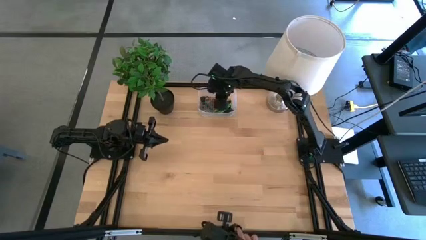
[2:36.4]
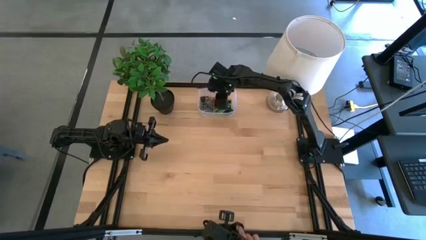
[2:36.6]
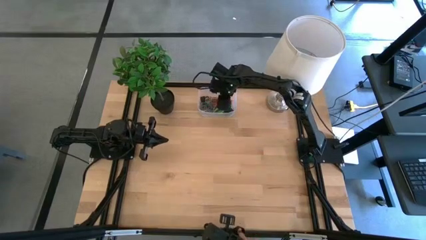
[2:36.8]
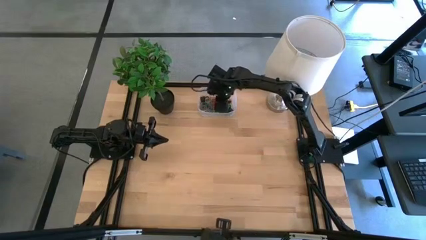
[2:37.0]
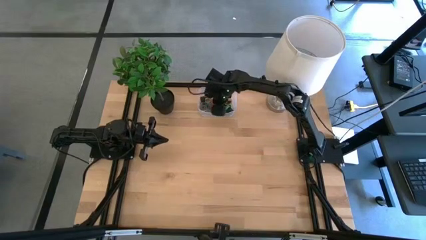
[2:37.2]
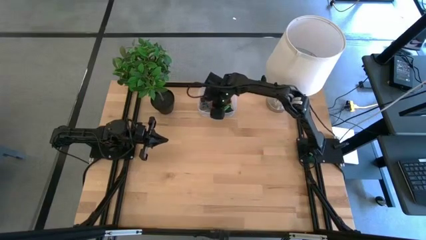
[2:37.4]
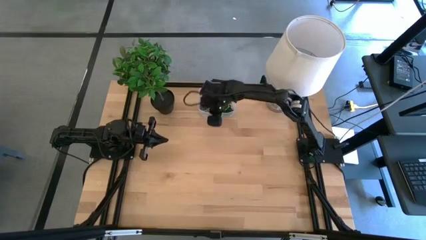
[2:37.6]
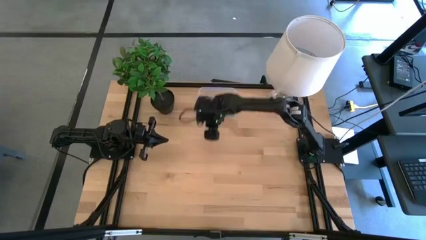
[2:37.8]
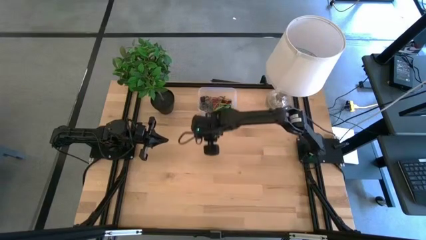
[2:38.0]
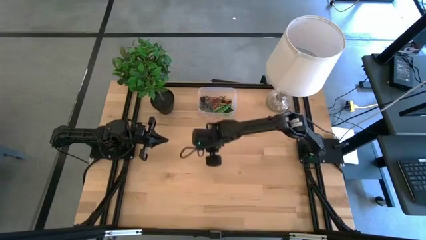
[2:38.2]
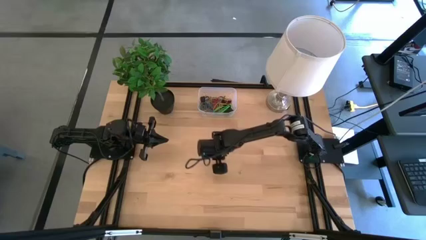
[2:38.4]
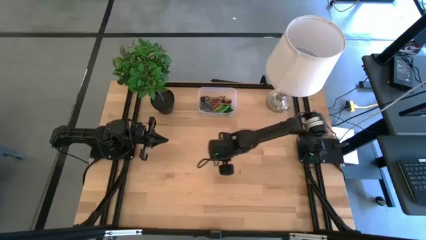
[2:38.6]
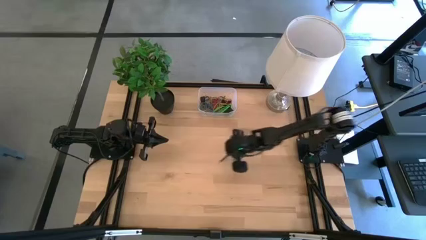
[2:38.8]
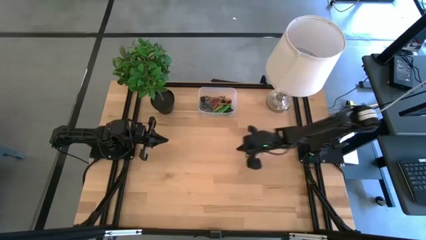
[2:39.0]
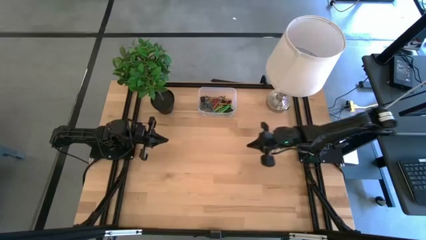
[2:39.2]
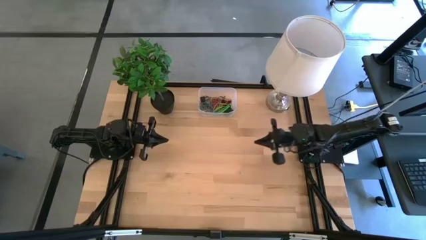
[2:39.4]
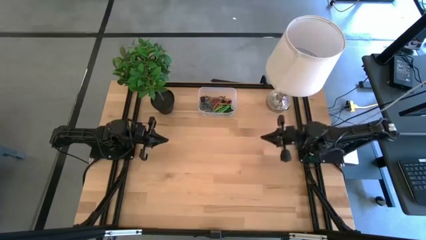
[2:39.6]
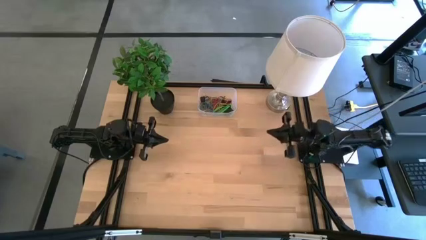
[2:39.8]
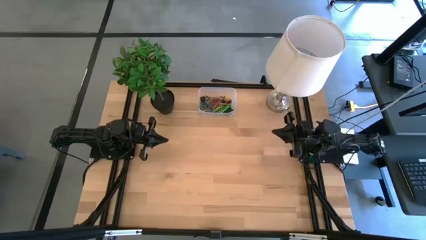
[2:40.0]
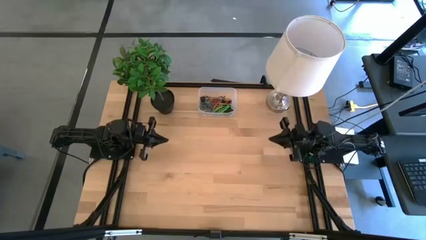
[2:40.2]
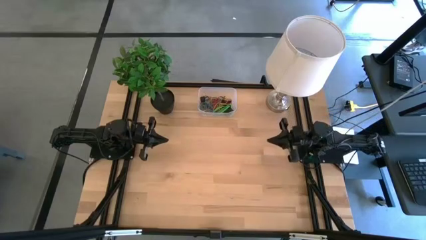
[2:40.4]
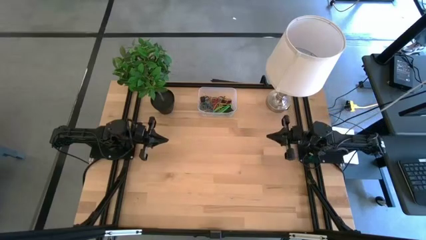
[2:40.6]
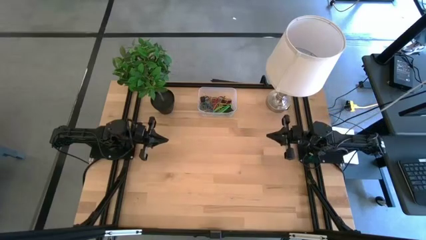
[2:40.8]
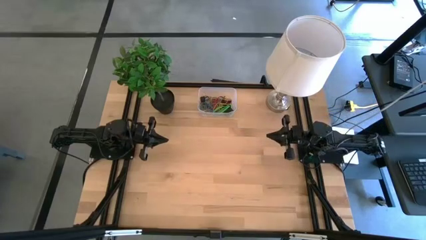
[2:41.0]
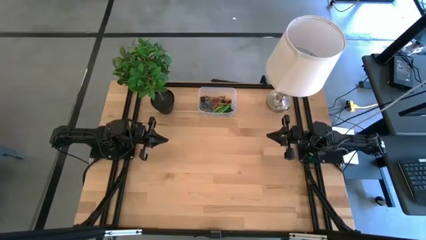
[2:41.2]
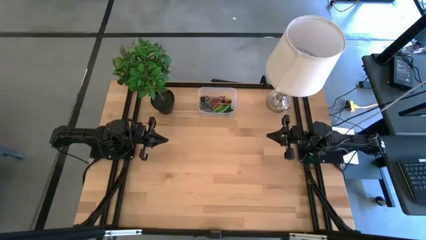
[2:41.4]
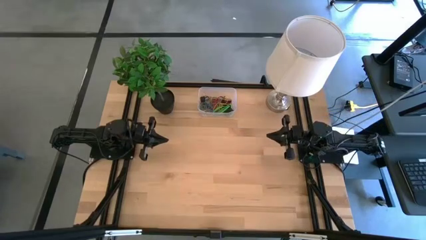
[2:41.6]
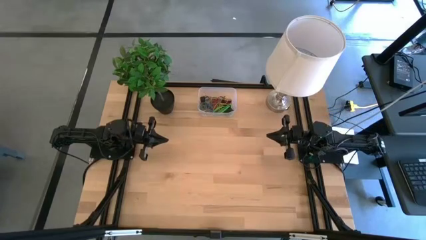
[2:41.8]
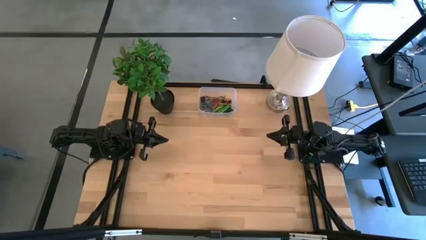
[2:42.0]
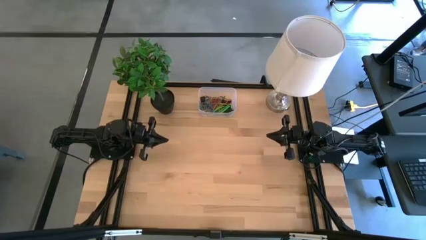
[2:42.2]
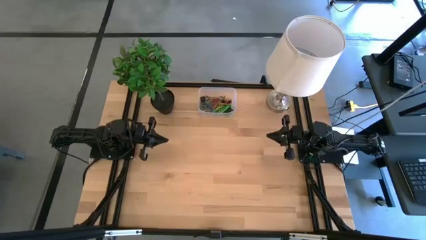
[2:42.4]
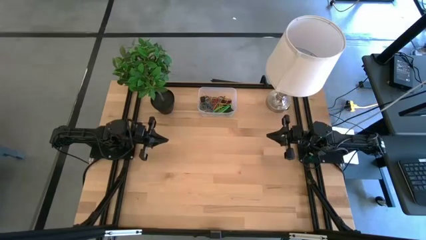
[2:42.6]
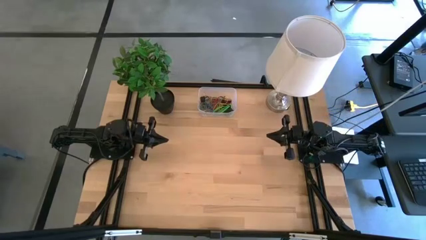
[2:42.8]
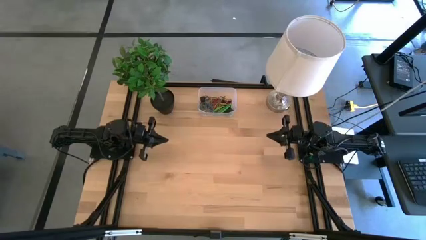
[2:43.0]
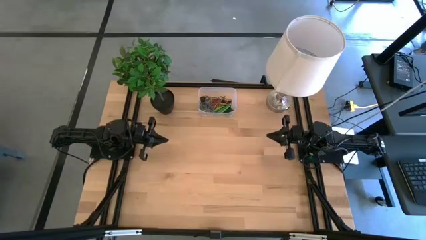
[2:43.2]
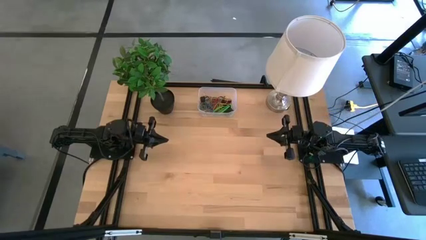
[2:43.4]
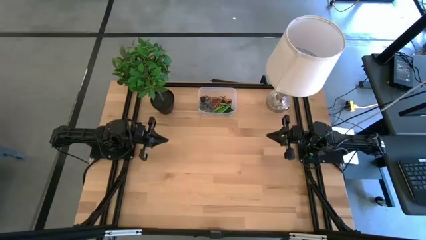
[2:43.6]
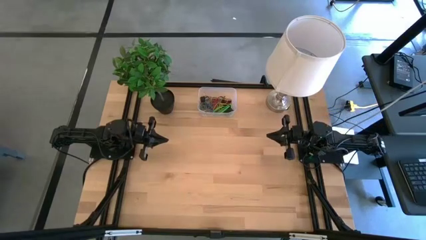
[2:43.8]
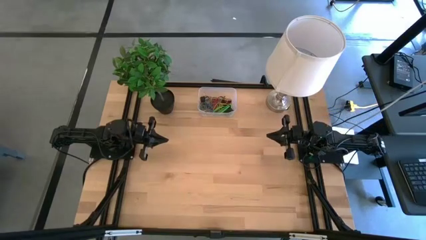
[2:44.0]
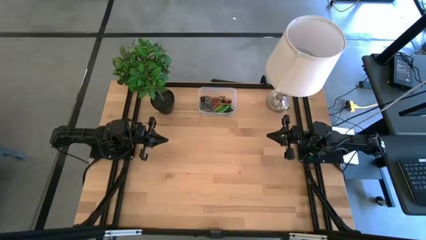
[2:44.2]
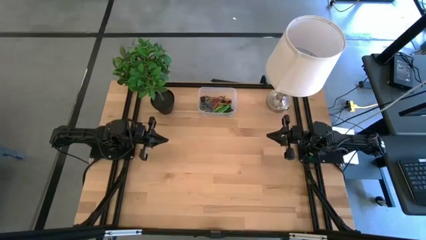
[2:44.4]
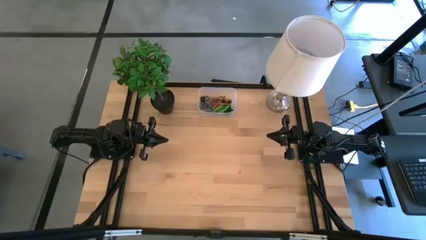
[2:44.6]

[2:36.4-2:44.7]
Task: Pick and place rubber bands into bin
Return to Home Position

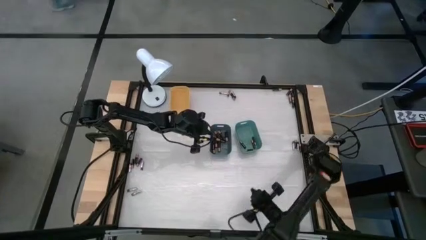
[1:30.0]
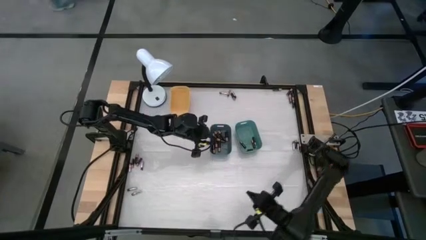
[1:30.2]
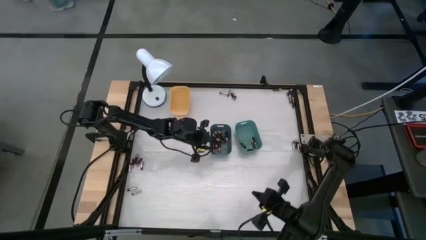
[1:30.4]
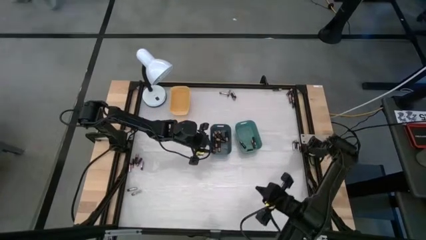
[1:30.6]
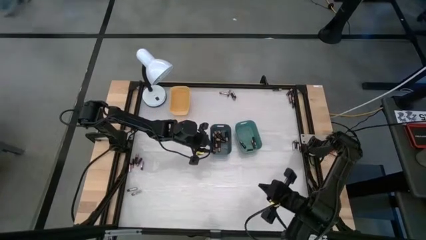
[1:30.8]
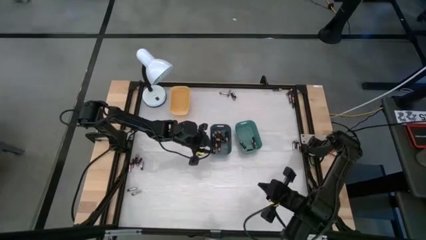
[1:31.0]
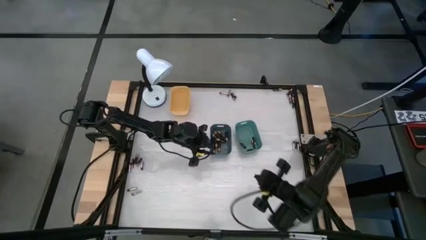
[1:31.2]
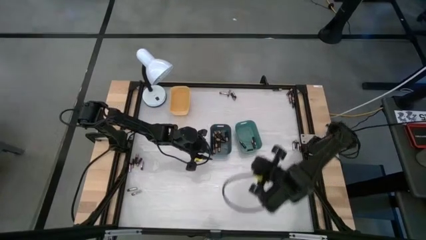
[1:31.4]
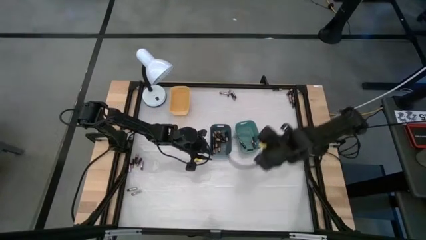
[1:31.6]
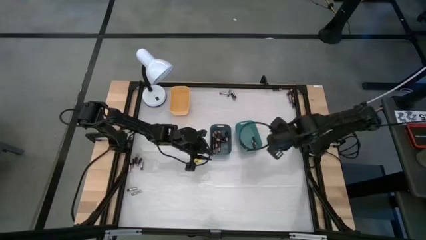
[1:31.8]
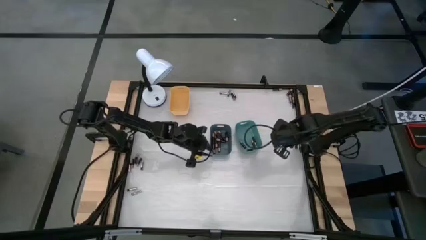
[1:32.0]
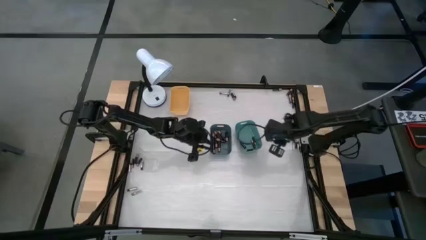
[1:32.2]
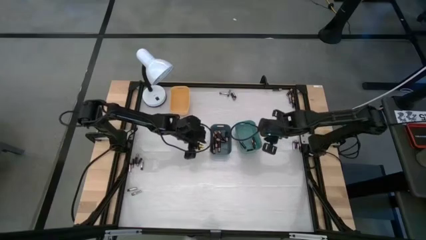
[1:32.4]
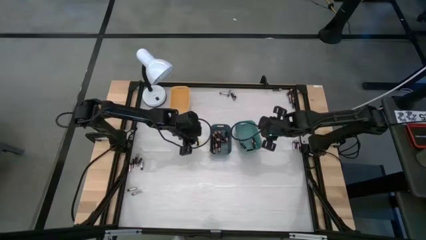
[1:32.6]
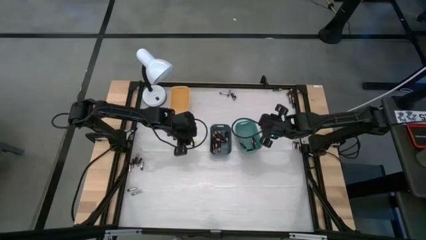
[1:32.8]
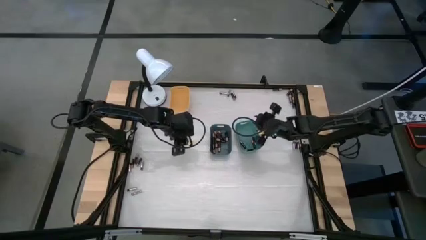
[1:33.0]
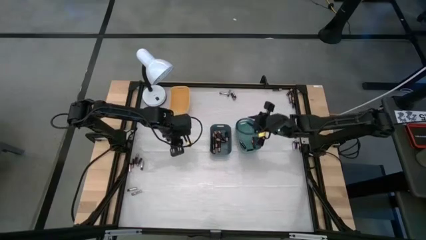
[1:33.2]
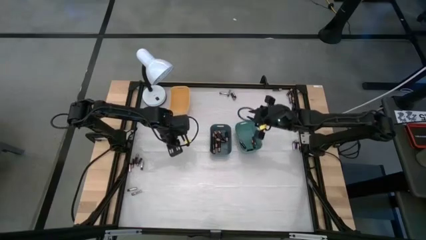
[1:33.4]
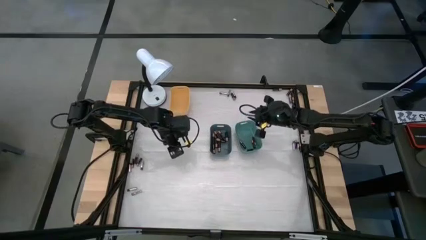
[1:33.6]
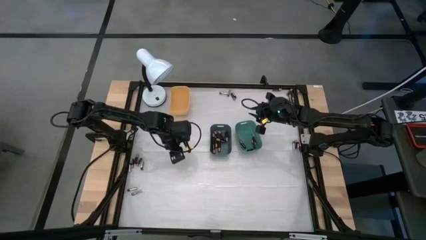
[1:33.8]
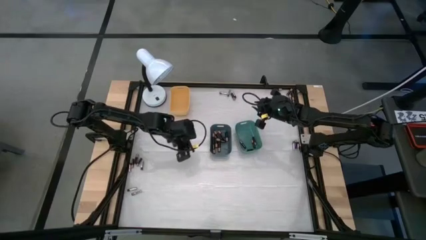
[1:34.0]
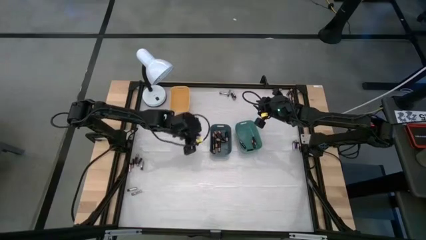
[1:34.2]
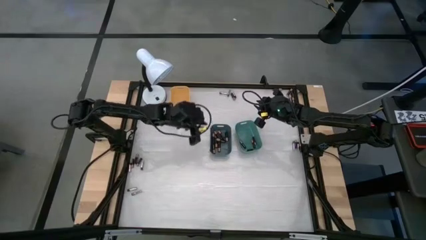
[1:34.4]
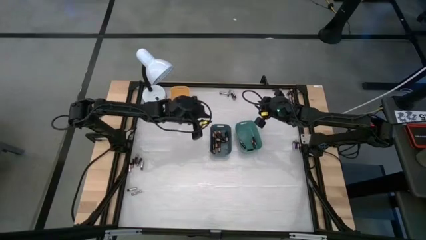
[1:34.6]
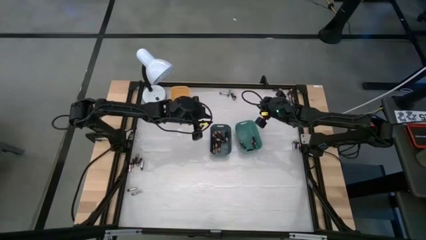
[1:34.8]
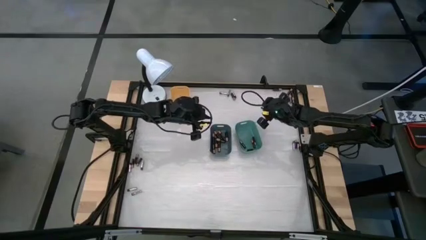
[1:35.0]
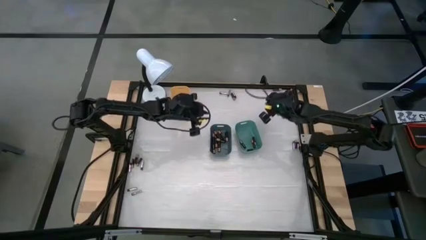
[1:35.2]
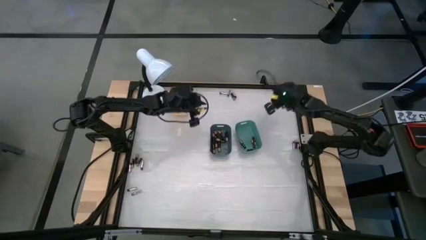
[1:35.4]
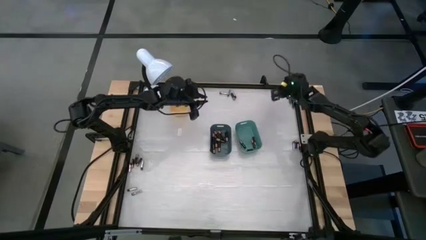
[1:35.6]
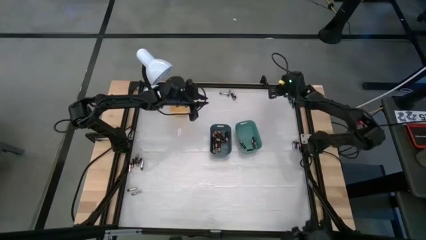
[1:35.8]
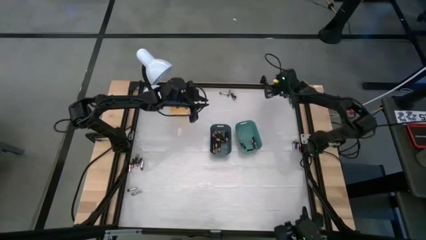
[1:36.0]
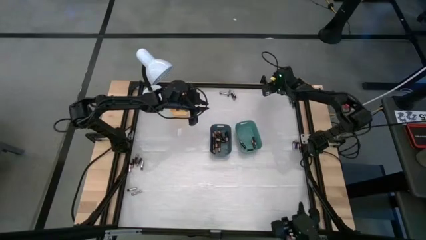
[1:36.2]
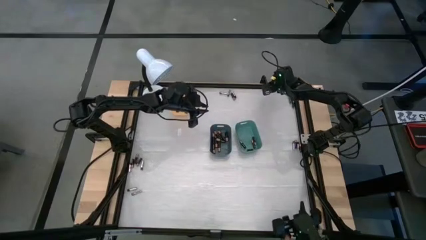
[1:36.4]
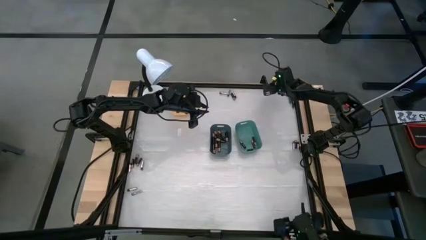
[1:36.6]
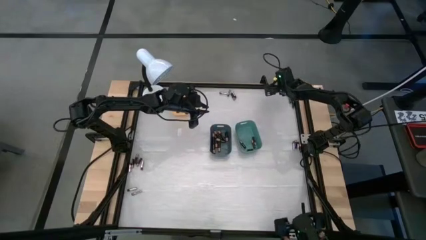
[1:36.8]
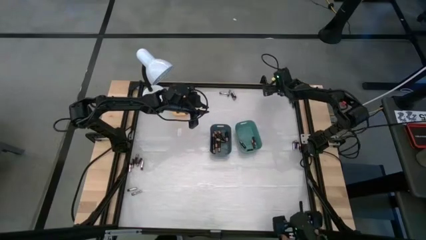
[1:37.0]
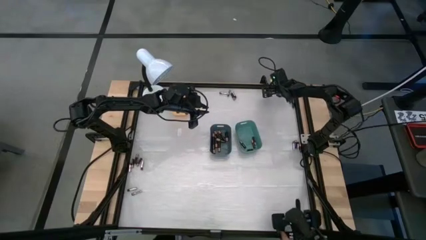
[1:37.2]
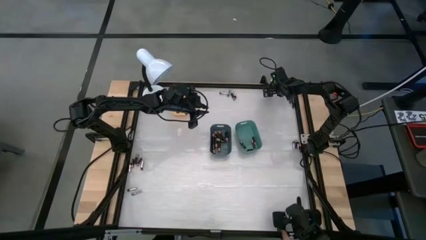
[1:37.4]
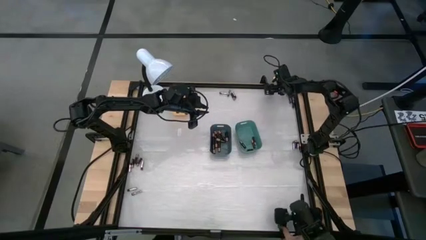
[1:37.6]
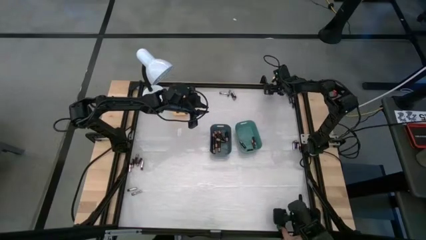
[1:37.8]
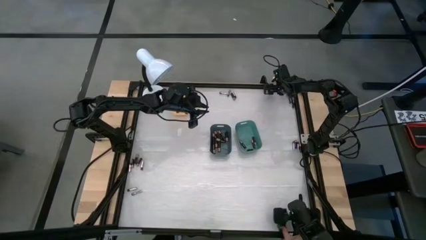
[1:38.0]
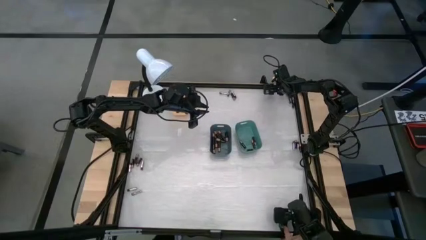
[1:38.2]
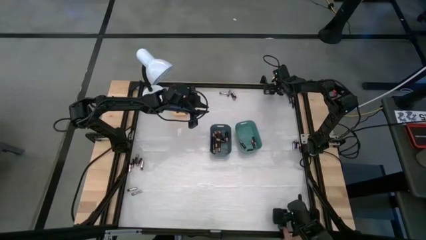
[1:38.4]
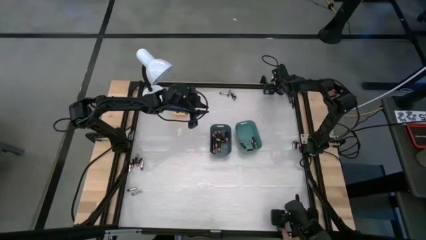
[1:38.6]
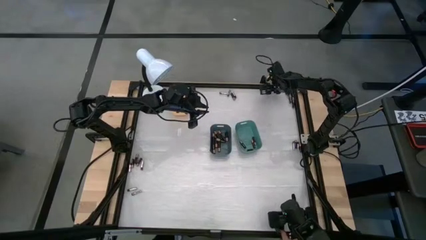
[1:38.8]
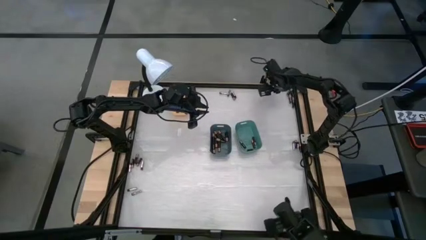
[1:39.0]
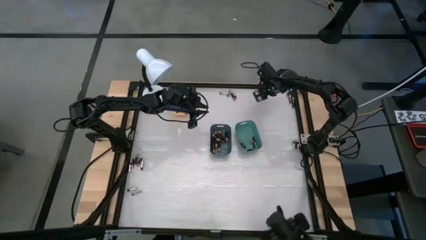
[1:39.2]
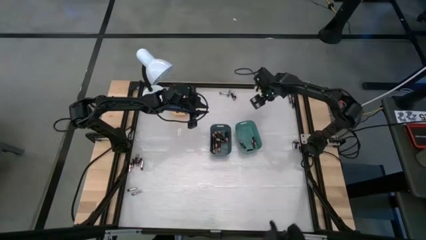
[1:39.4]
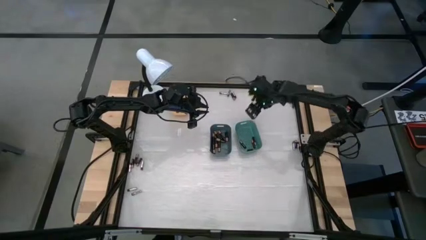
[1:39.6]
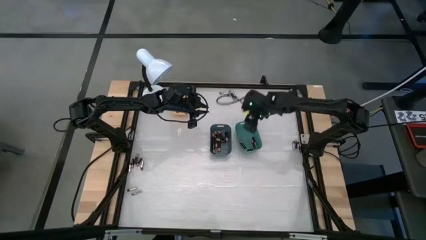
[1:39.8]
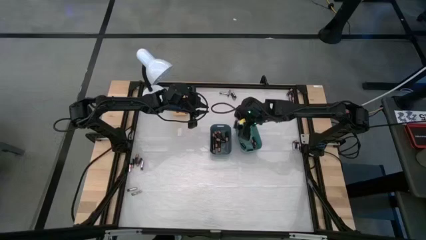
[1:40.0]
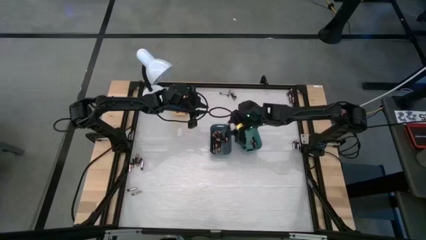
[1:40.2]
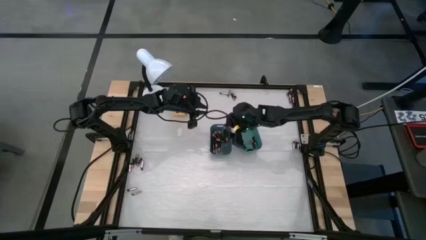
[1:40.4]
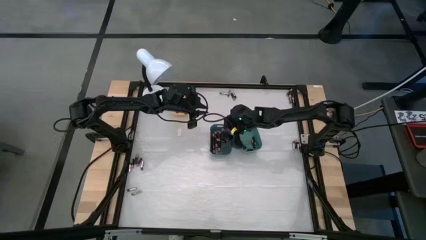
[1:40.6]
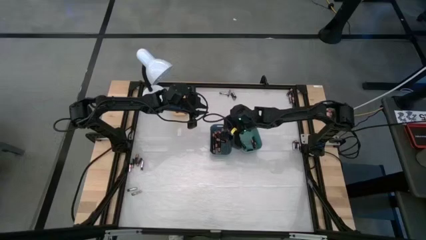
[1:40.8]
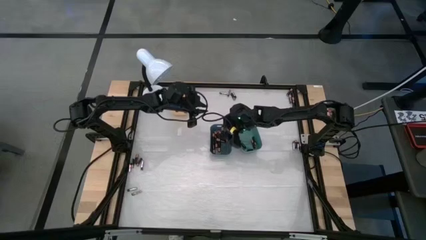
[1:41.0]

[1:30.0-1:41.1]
Task: Sort batteries
Put the black battery into the blue bin
